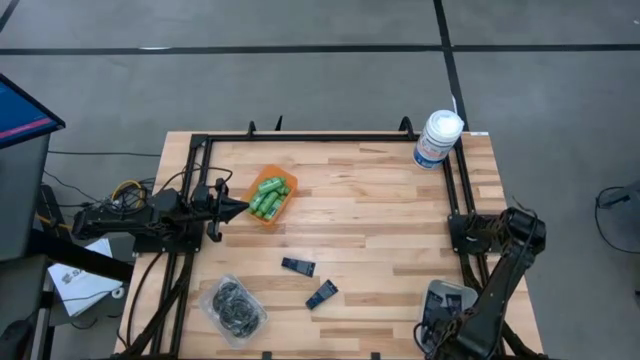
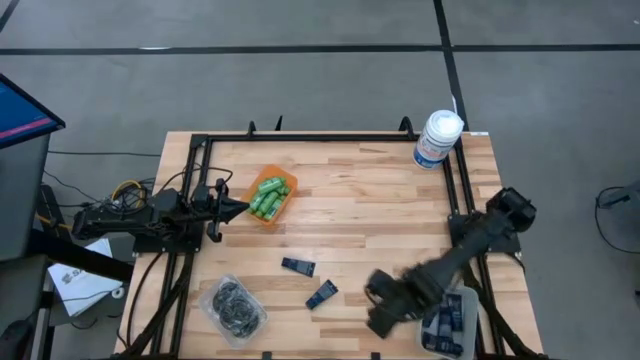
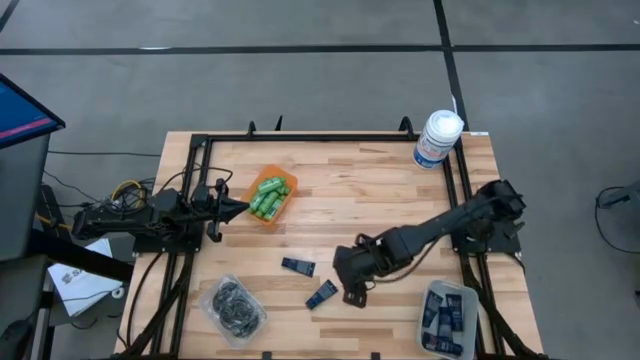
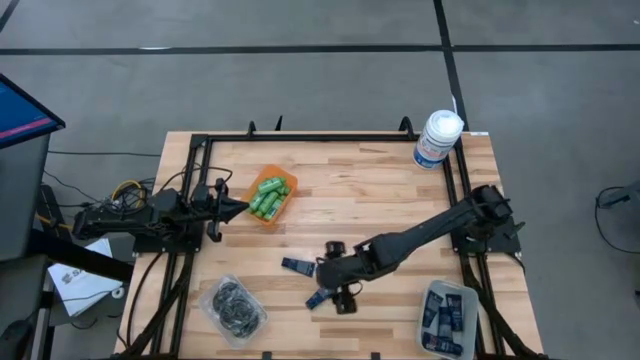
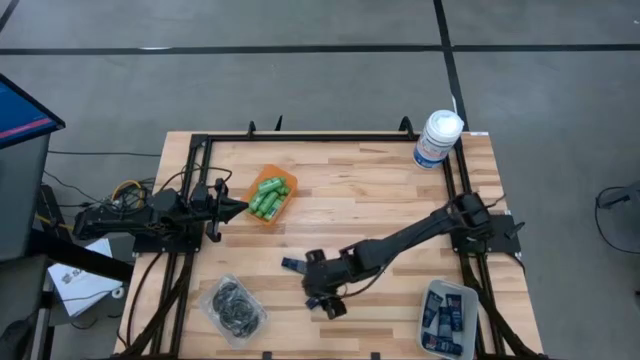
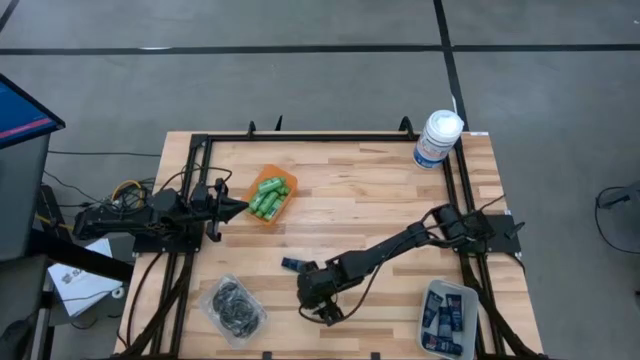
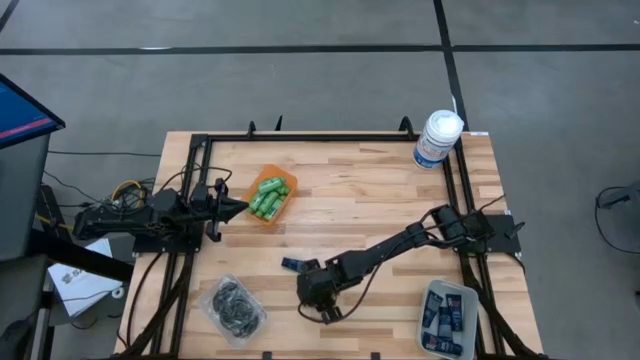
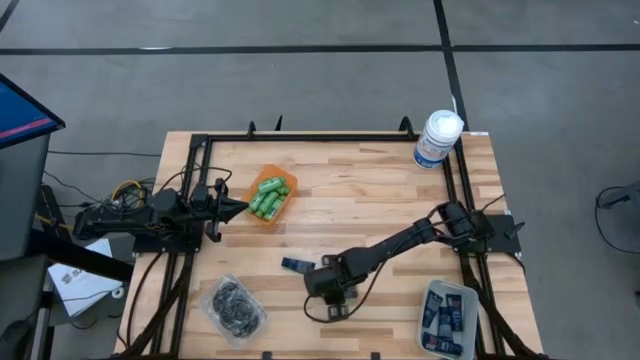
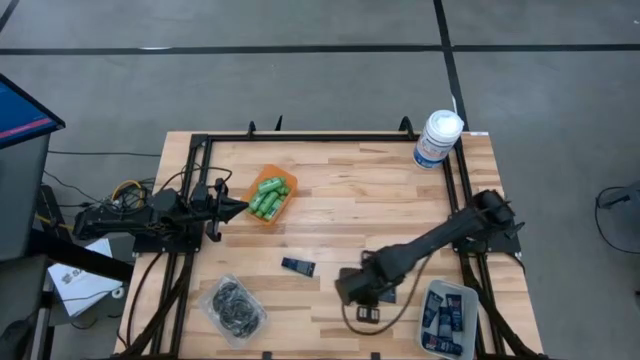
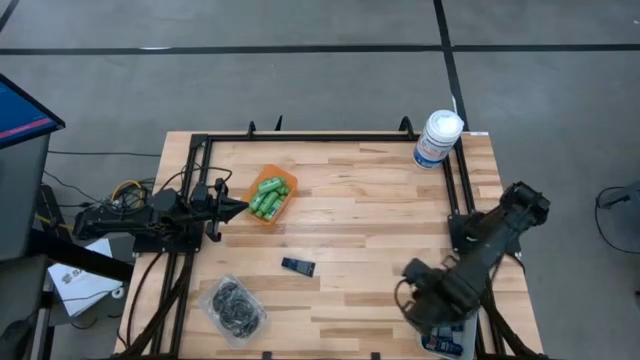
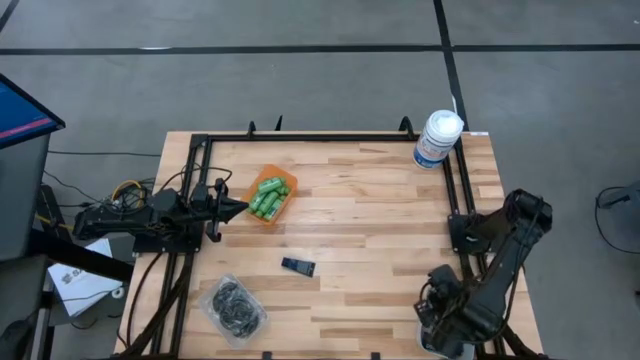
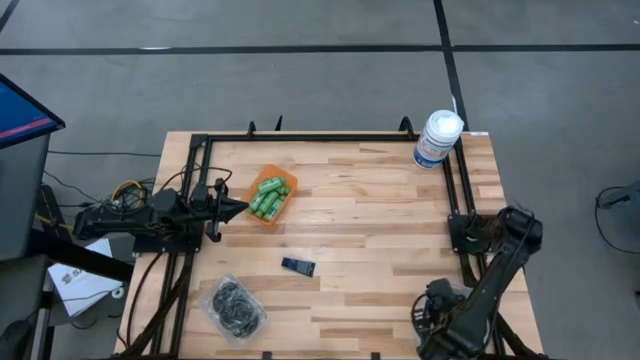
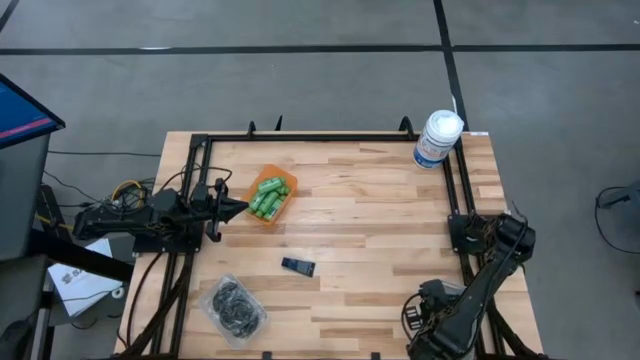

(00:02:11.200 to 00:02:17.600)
Task: Pick & Place Travel size toiletries
Put the dark blue shaving cream into the gray bin

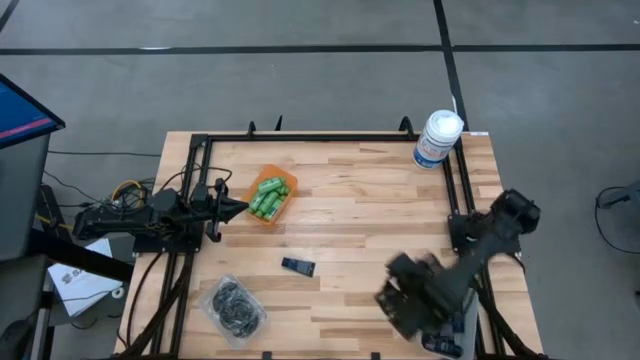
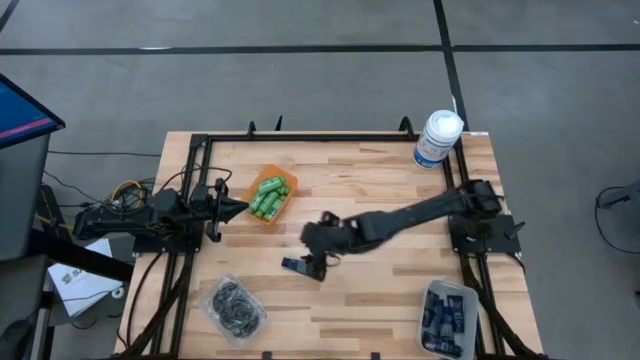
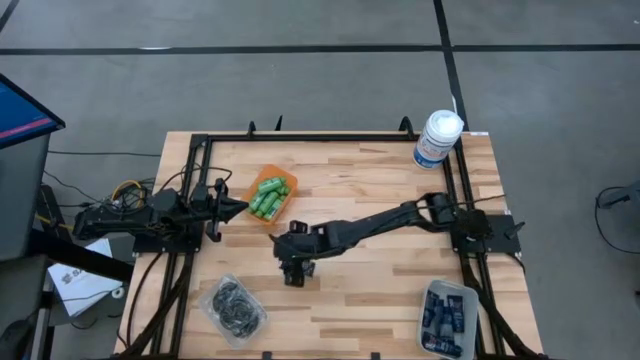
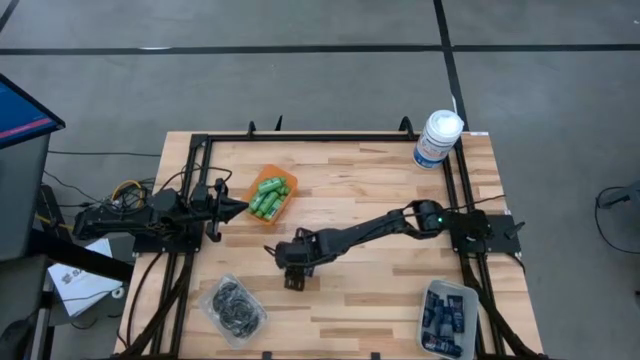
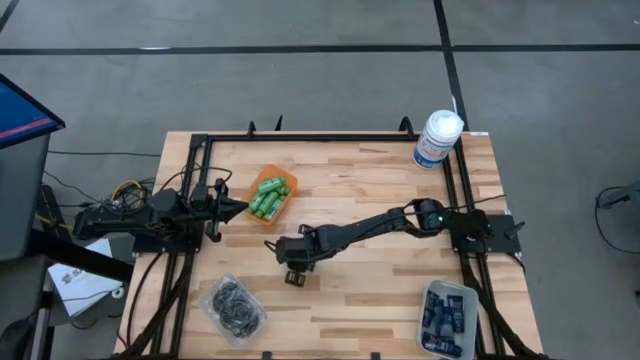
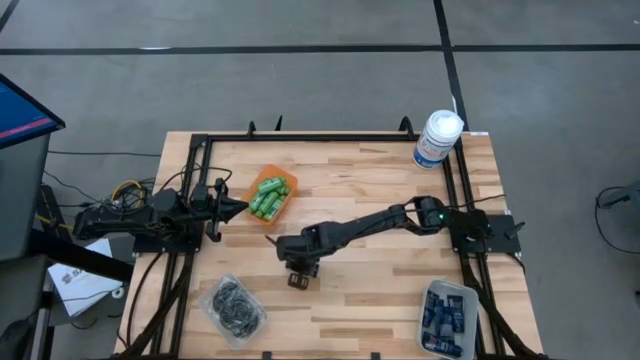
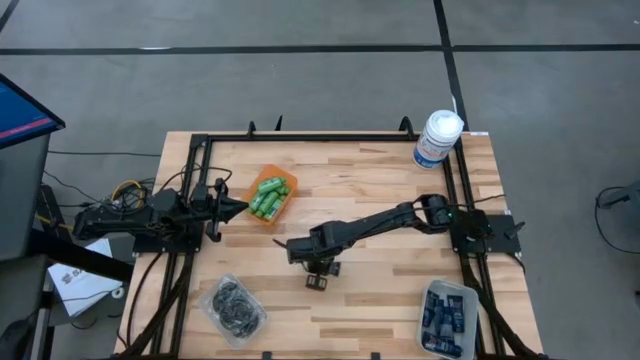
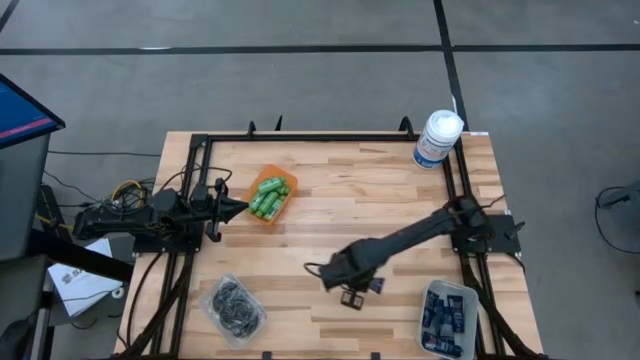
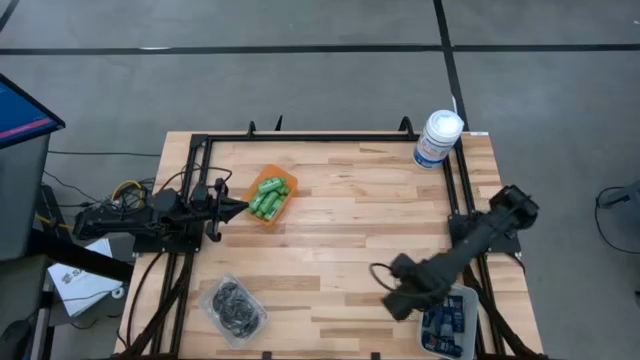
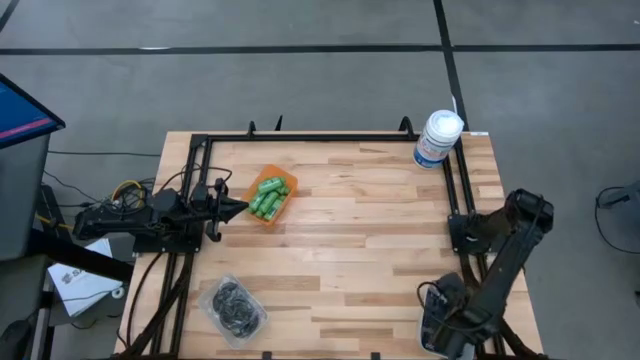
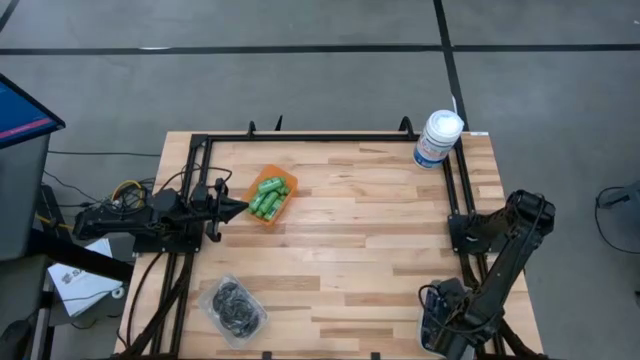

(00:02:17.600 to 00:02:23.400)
Put the dark blue shave cream into the gray bin

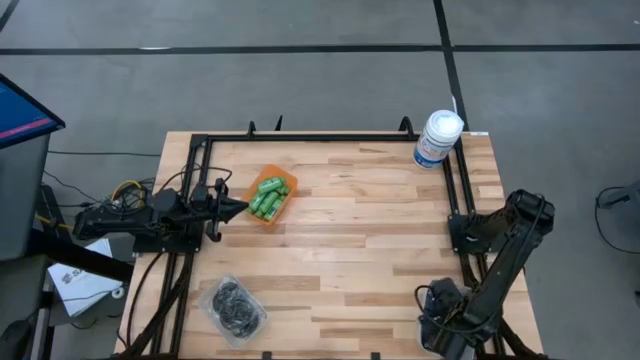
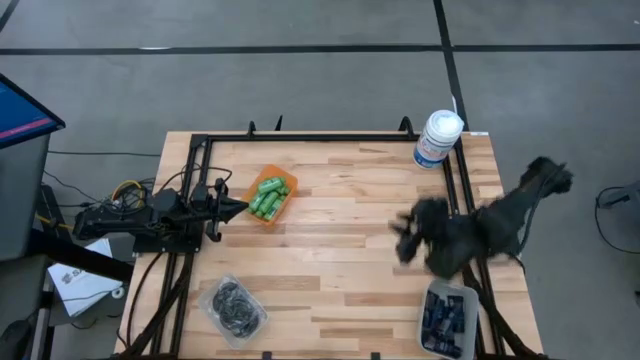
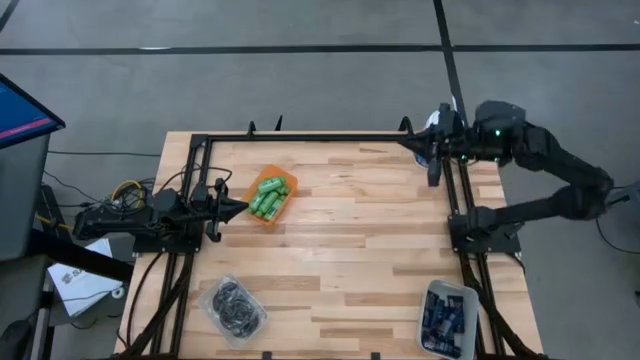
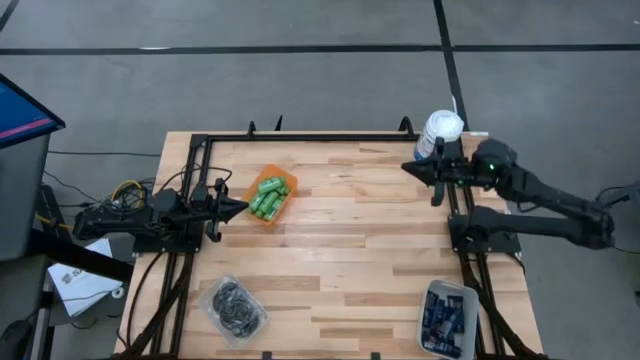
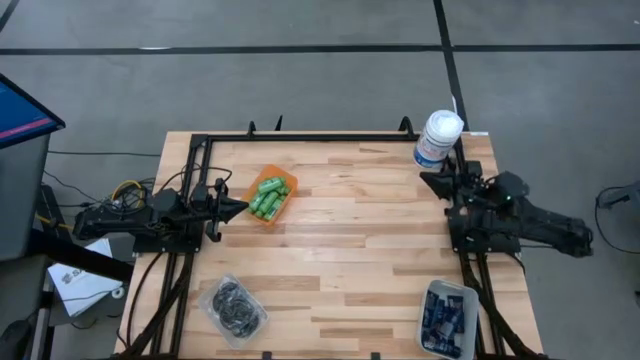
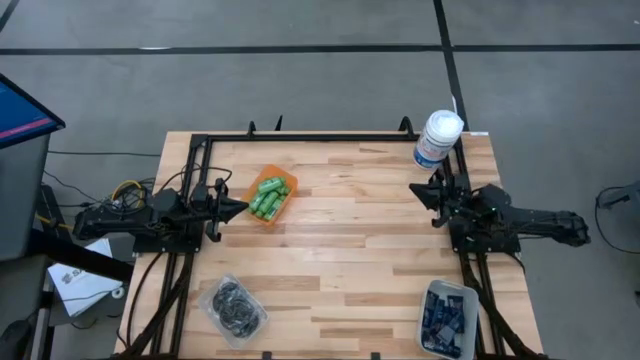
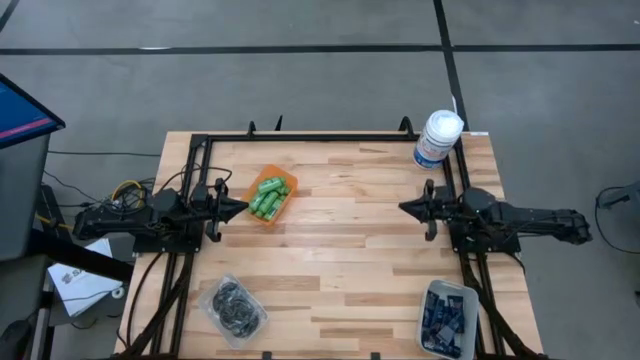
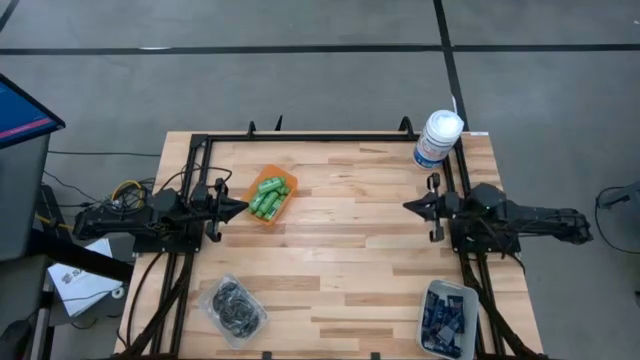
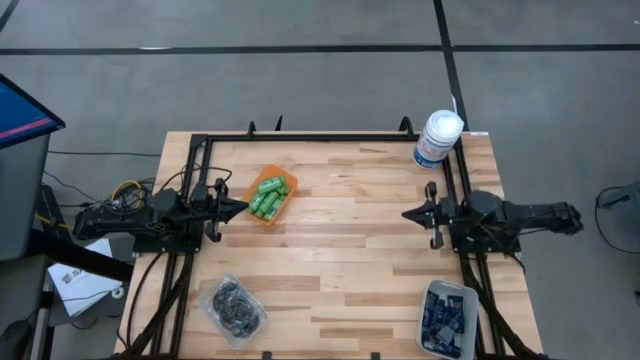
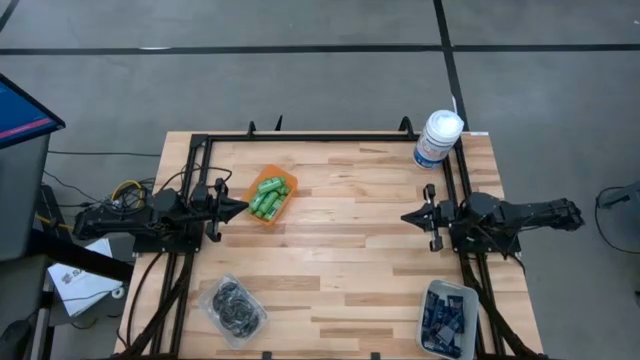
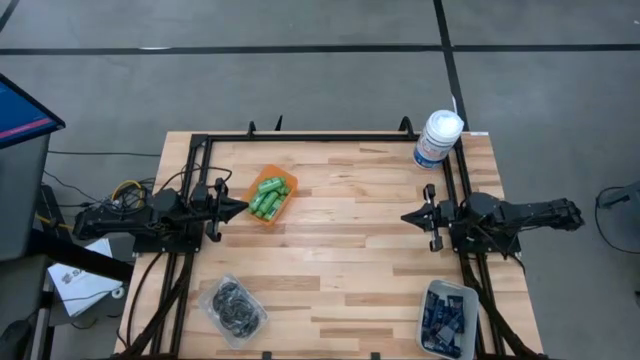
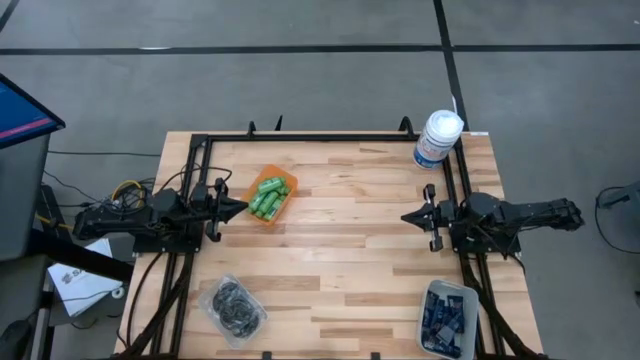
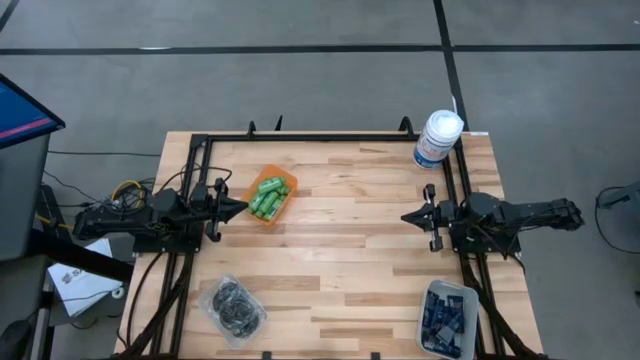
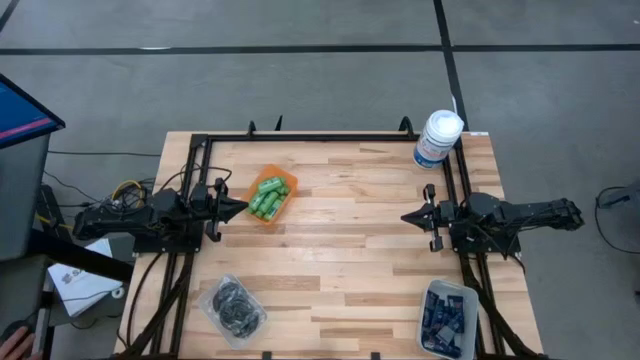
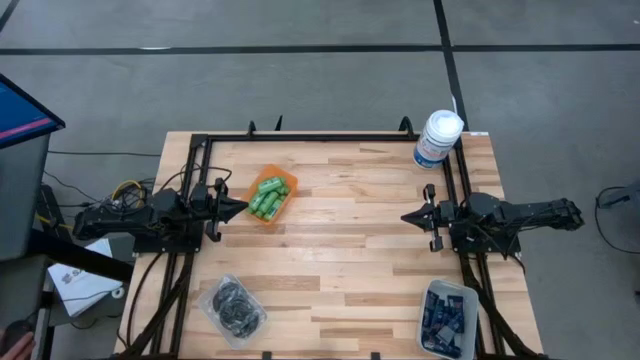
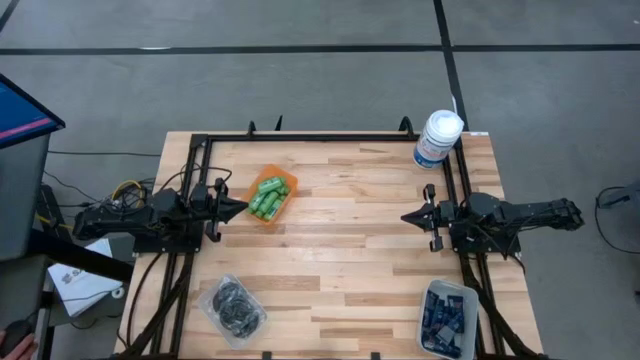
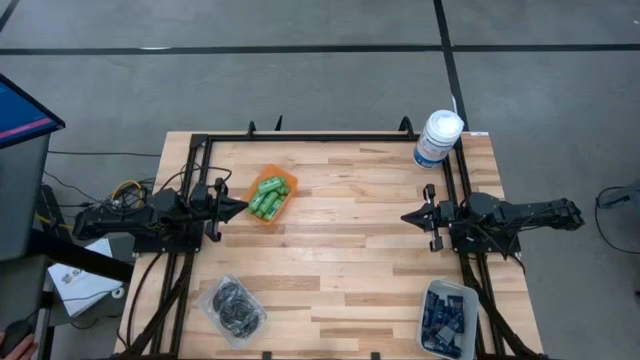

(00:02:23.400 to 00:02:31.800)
Return to Home Position
